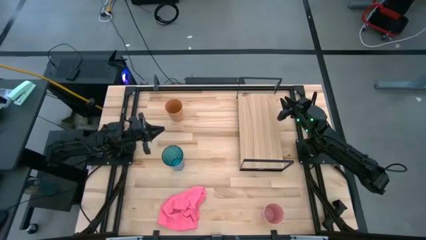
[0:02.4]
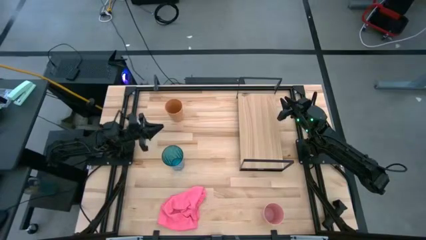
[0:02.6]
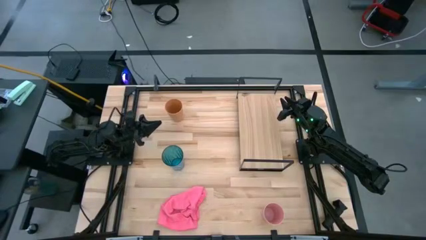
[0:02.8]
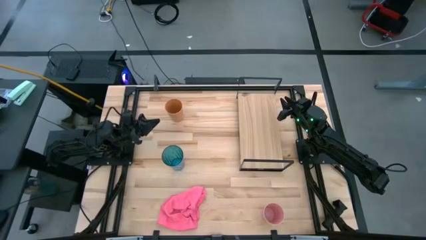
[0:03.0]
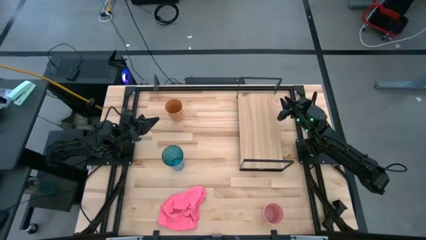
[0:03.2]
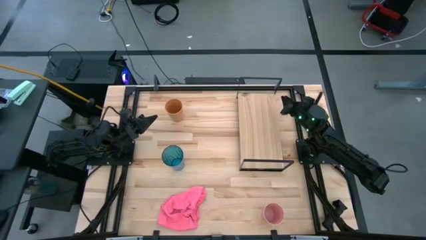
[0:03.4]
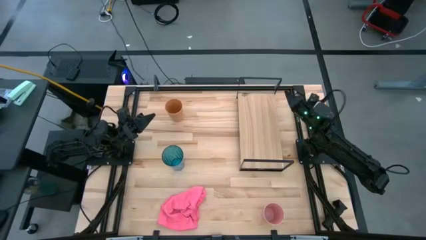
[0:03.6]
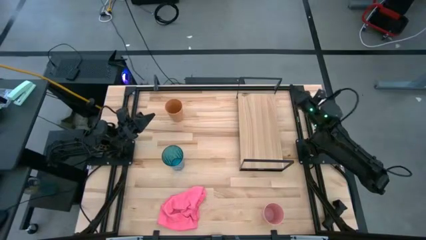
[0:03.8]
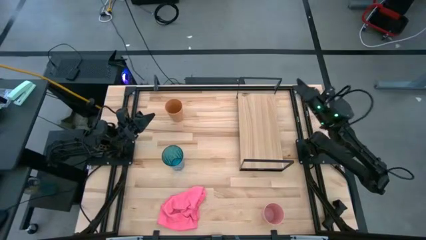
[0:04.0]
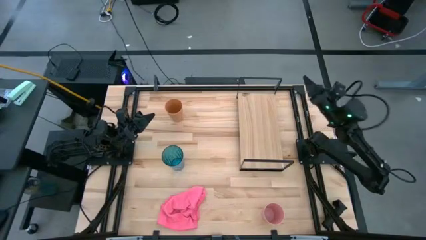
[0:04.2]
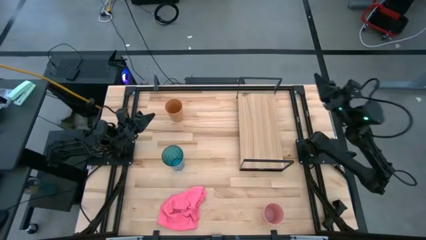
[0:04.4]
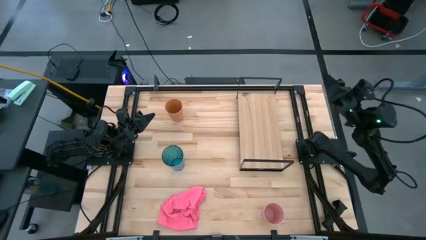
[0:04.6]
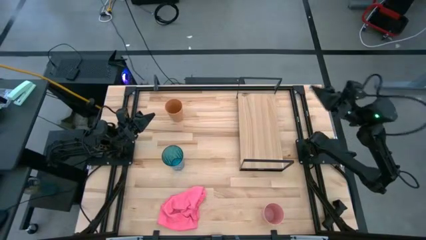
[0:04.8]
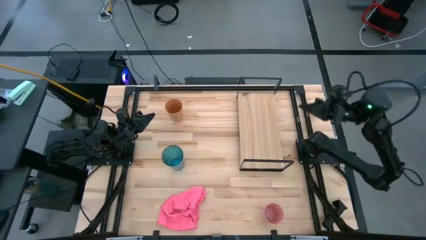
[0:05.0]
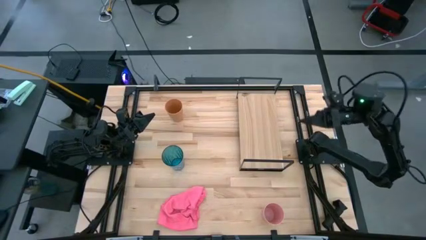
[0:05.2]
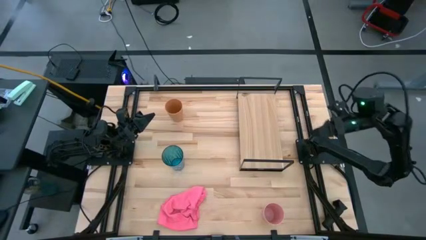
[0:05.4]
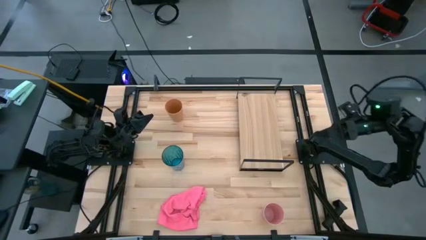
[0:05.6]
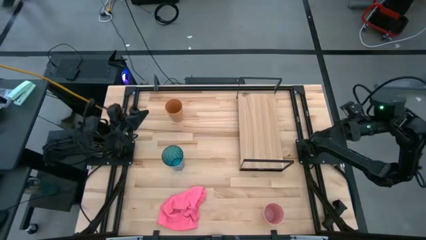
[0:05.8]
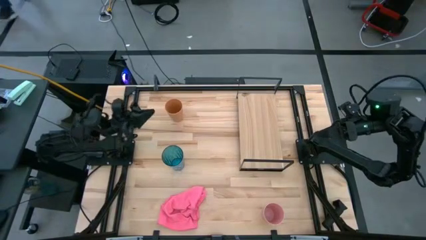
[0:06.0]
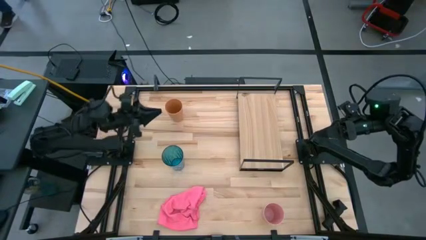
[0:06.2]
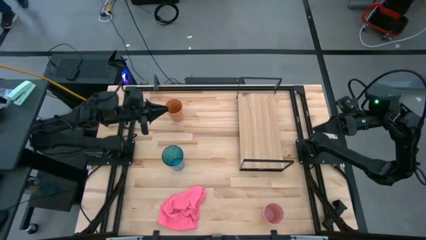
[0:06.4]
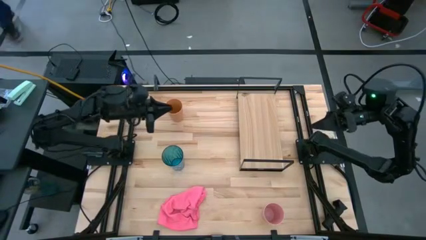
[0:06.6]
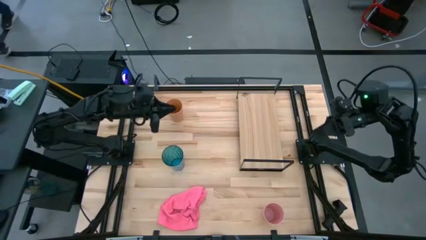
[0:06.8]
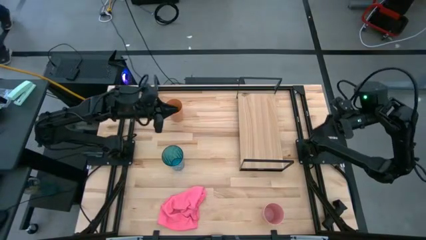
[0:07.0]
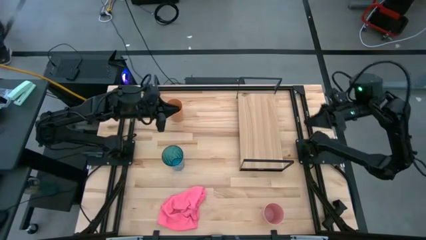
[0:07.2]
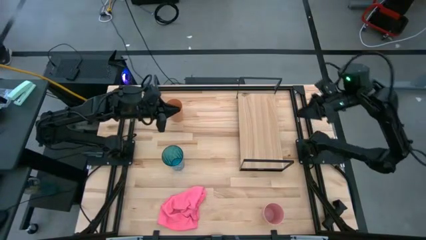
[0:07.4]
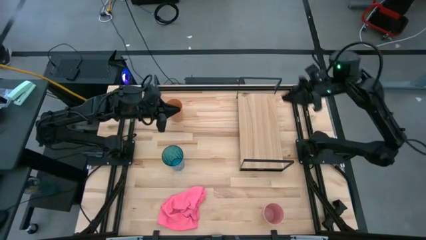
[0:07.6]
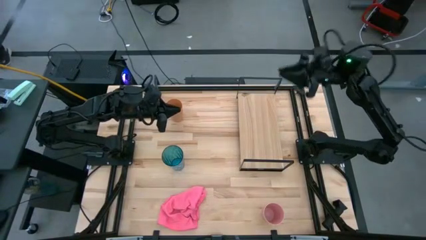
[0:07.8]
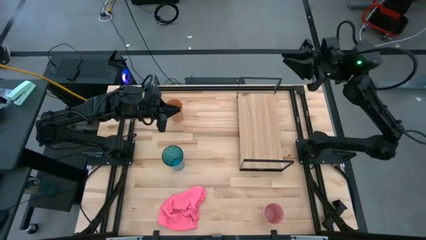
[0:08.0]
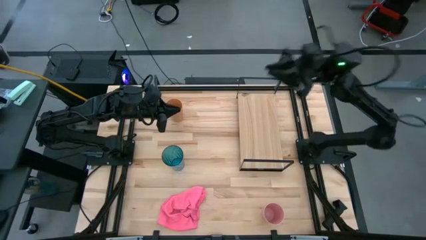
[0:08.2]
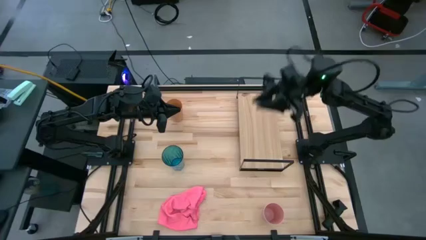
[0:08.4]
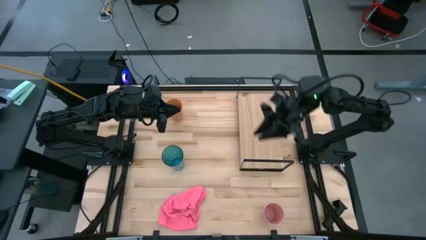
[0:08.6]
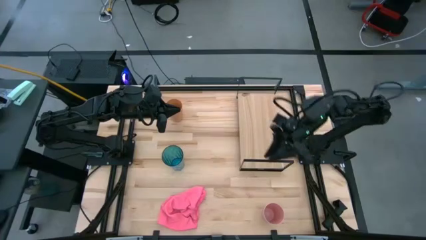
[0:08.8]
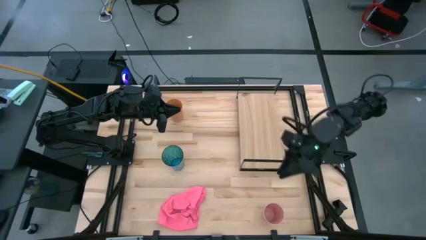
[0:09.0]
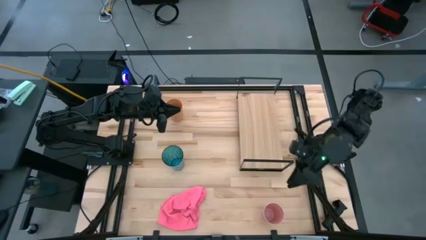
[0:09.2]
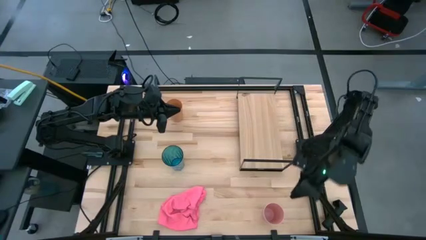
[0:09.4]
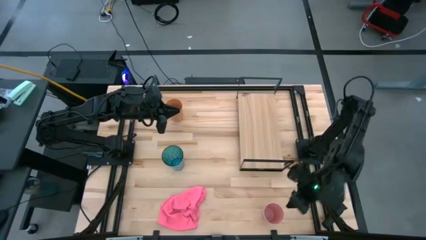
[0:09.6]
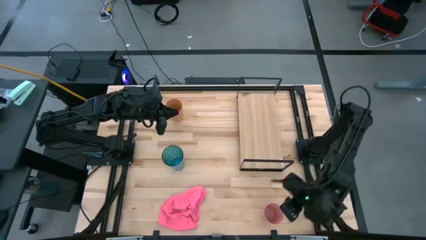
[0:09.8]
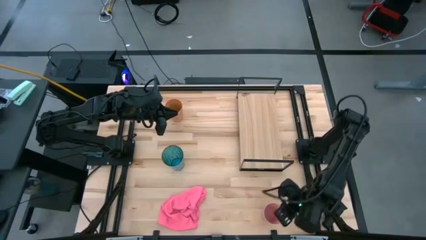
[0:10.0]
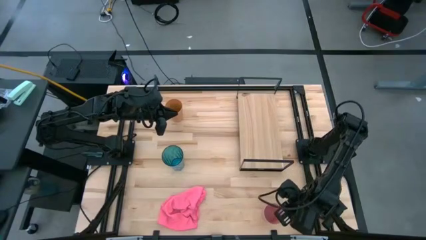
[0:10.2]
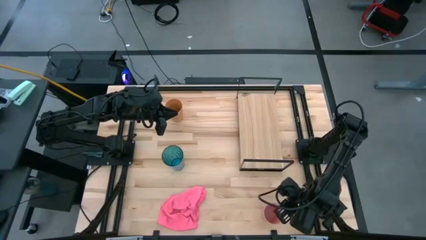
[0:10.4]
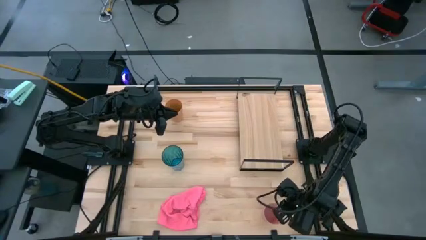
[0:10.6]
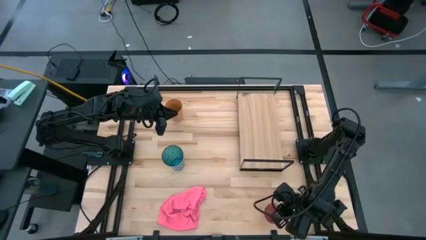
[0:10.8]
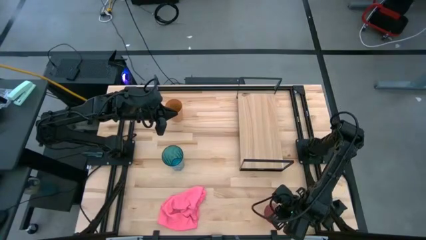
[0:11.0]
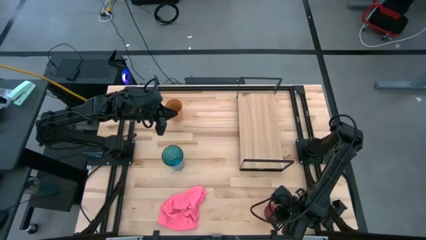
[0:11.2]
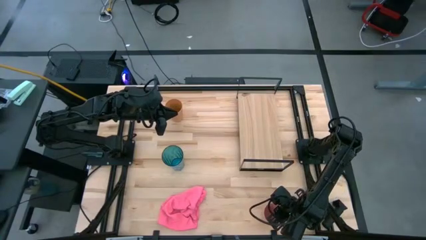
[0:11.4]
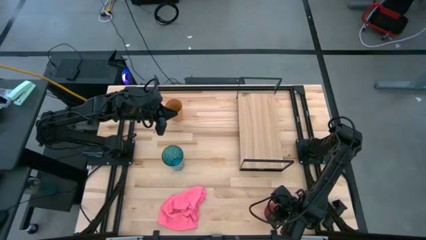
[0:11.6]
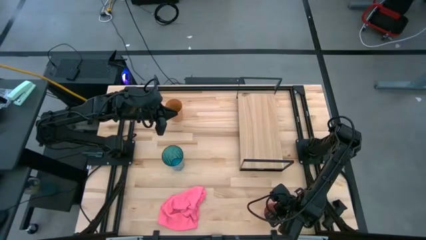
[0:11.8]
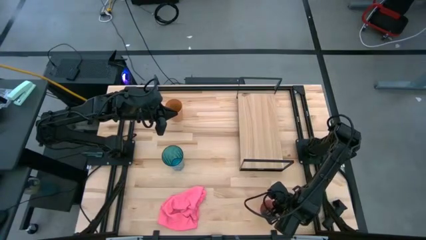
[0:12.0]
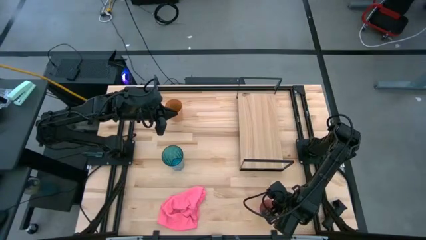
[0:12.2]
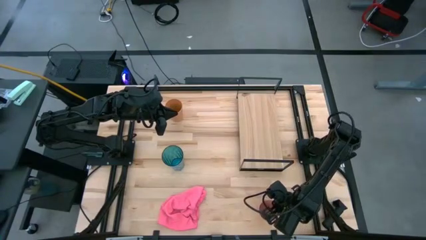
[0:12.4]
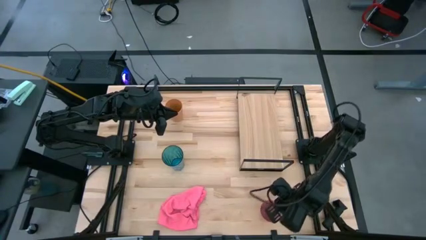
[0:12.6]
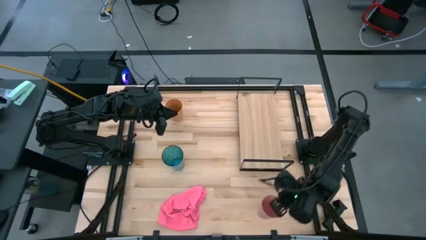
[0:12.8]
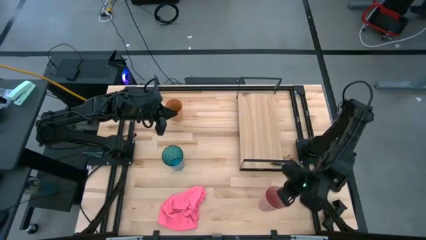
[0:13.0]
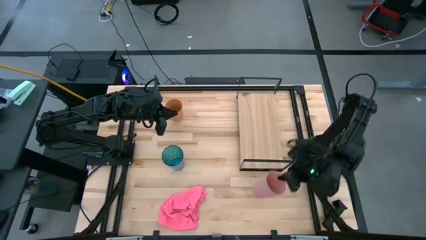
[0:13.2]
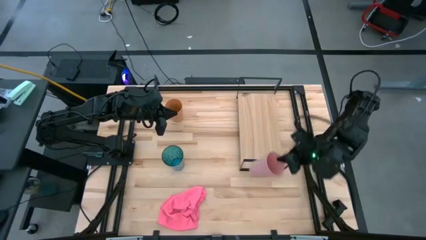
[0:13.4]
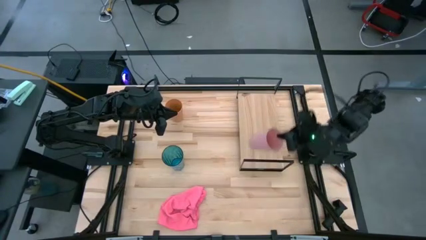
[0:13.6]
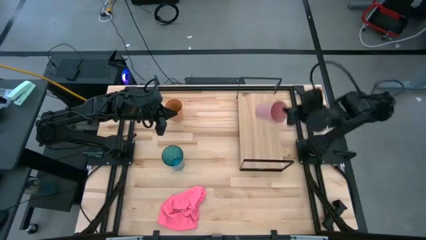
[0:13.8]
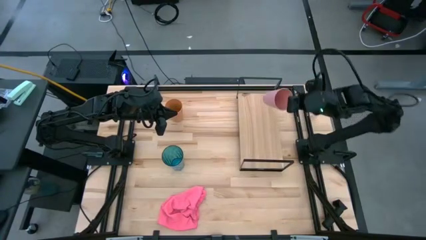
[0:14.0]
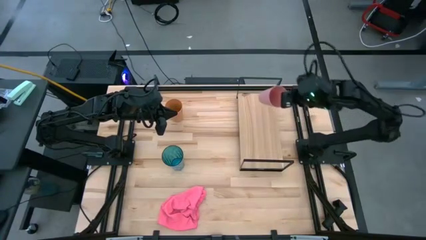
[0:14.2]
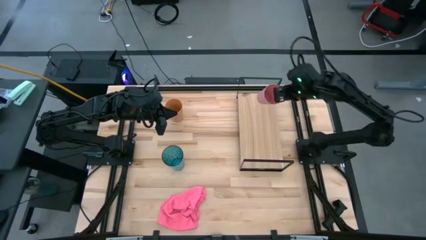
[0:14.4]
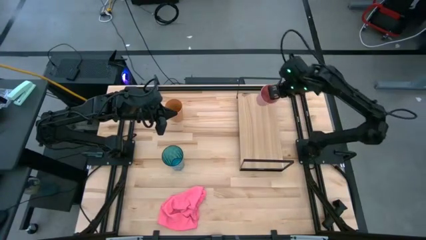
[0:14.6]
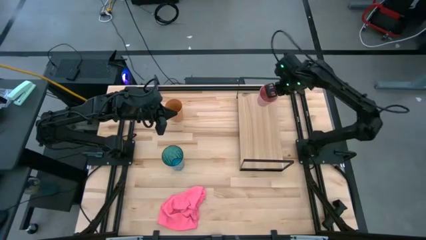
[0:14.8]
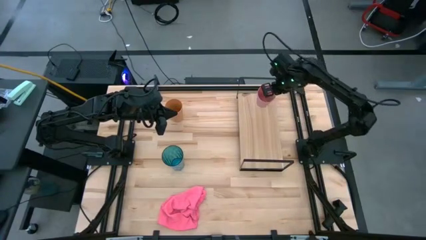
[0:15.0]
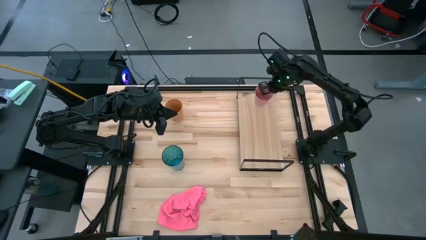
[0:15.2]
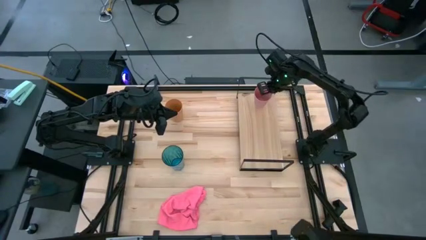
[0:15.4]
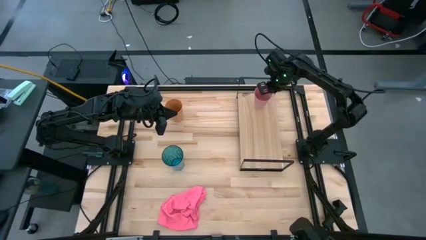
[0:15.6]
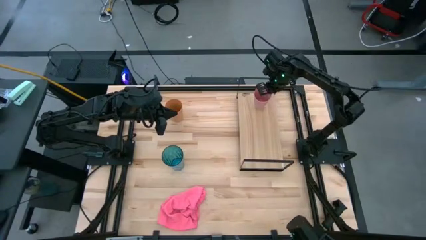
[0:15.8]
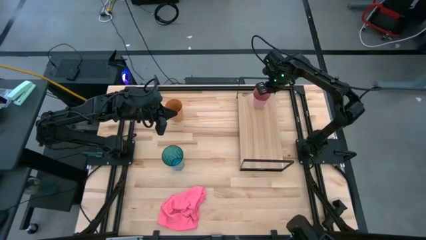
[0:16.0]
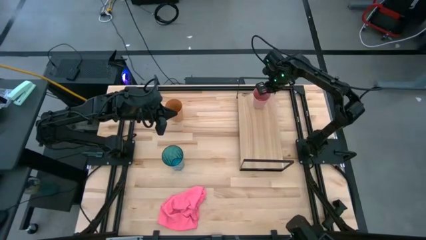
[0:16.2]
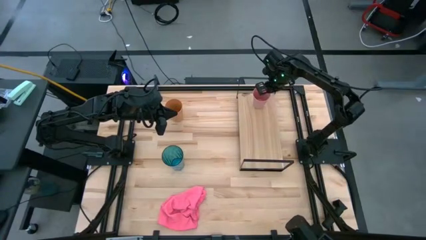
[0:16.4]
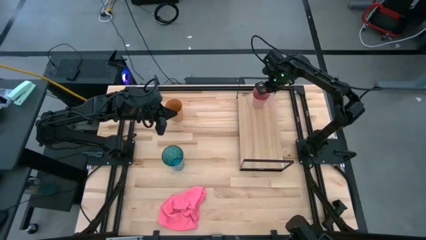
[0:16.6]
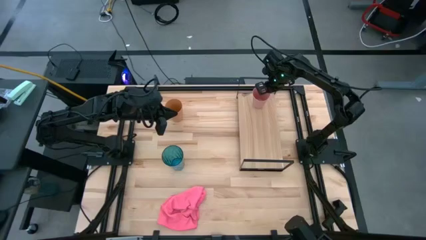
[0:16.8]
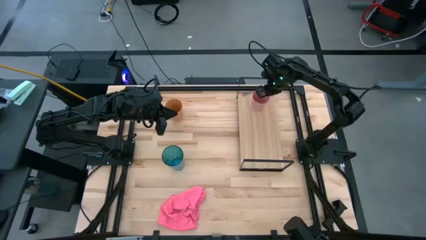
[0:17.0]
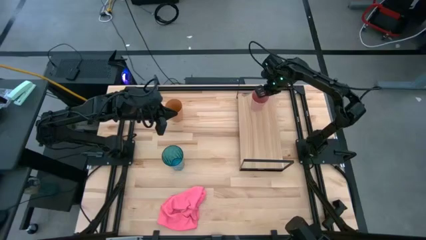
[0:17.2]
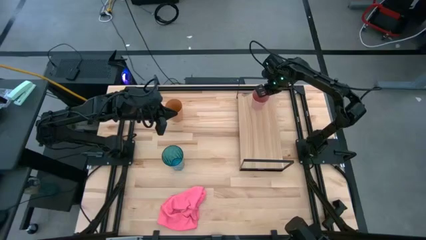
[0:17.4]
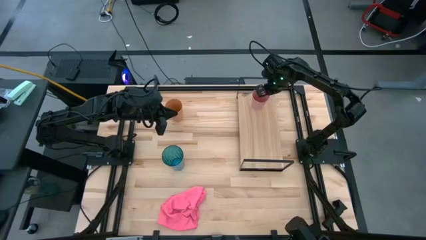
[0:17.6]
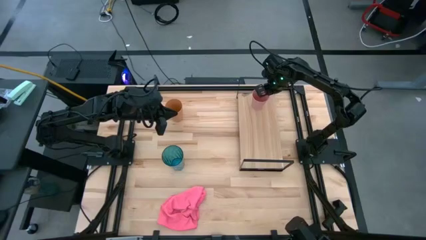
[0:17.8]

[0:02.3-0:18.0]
Task: Stack small to large cups/mugs on shelf
Put the pink cup on the shelf
